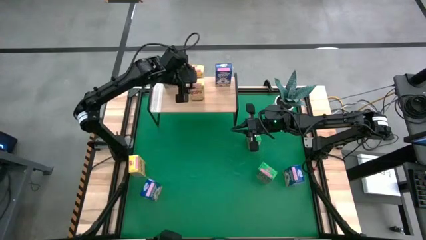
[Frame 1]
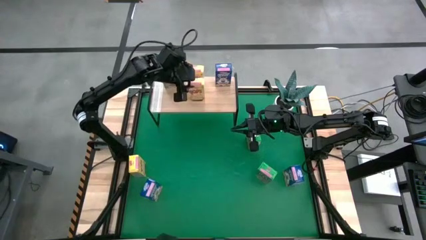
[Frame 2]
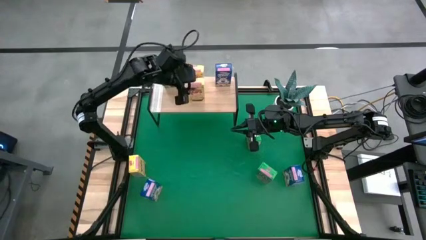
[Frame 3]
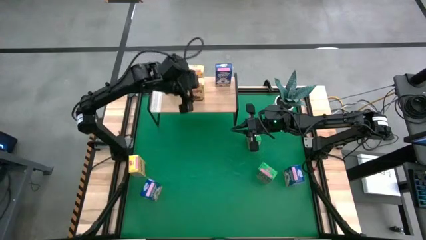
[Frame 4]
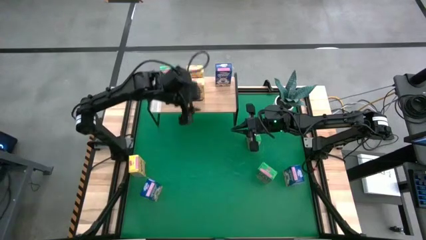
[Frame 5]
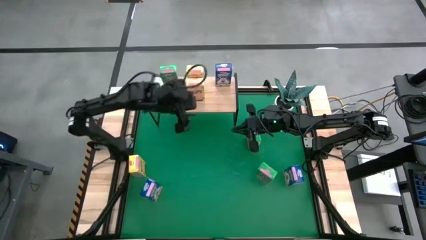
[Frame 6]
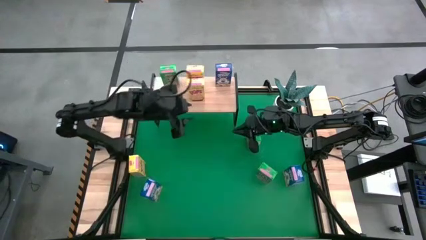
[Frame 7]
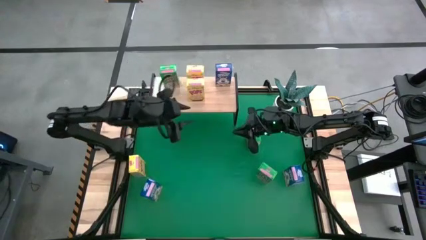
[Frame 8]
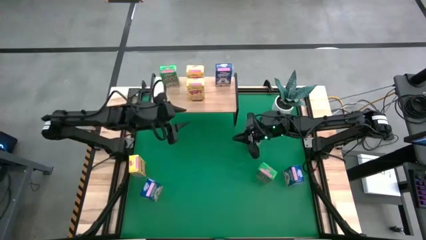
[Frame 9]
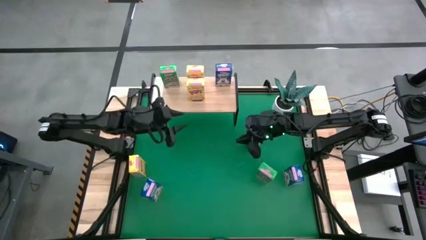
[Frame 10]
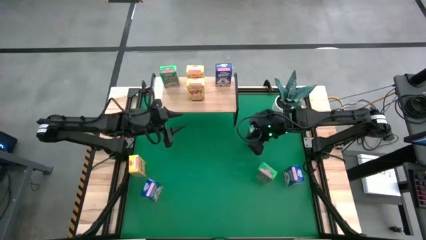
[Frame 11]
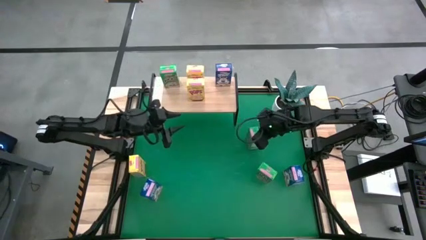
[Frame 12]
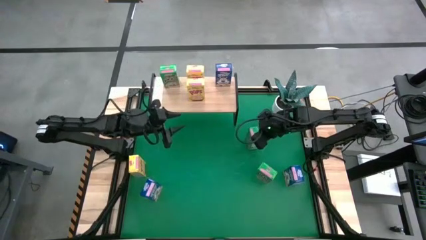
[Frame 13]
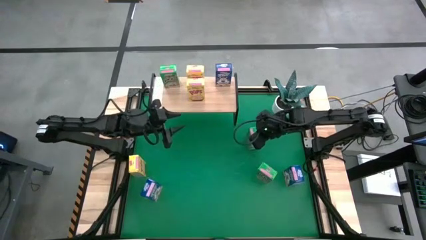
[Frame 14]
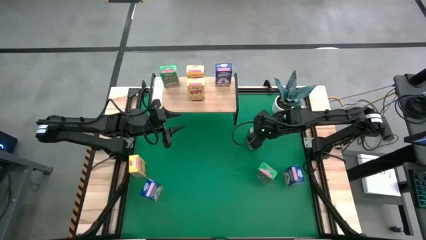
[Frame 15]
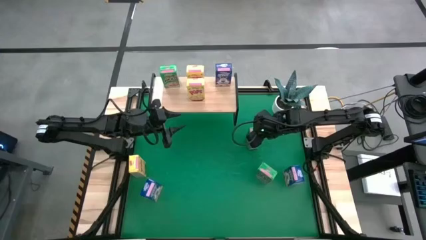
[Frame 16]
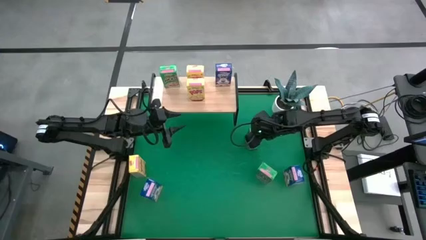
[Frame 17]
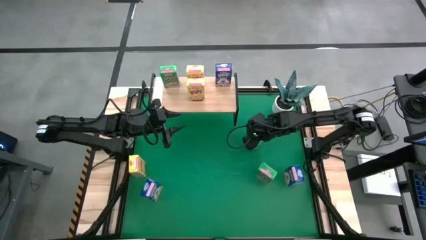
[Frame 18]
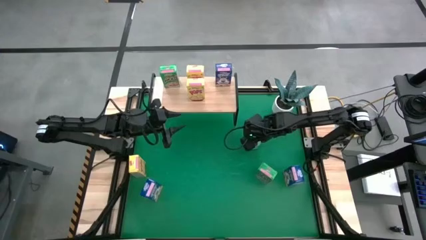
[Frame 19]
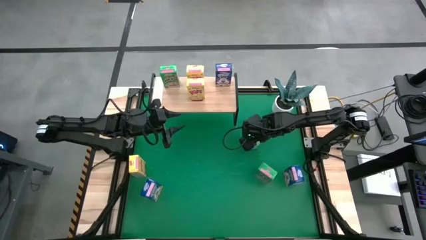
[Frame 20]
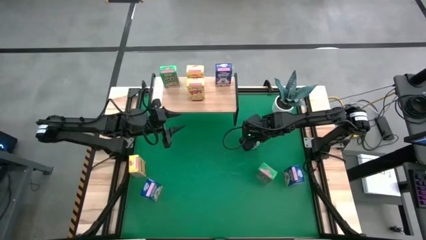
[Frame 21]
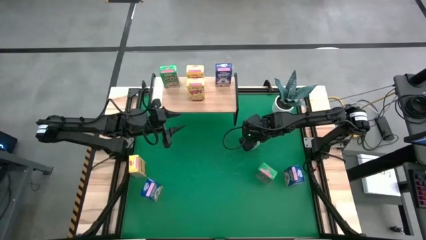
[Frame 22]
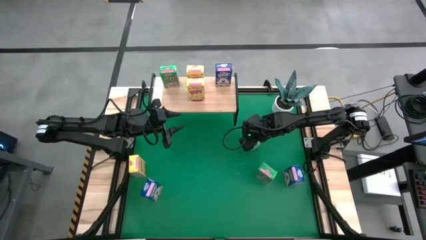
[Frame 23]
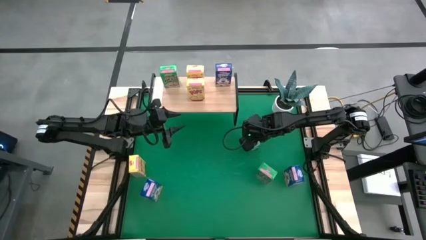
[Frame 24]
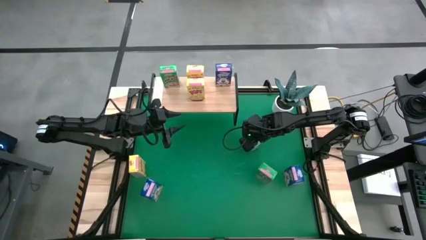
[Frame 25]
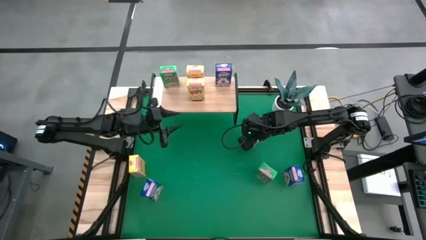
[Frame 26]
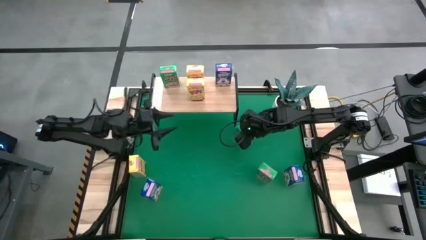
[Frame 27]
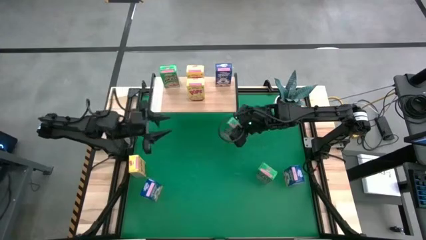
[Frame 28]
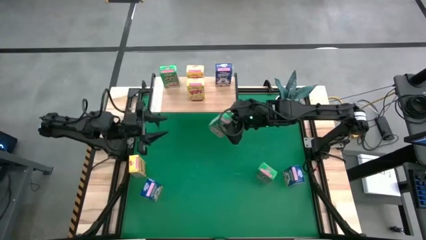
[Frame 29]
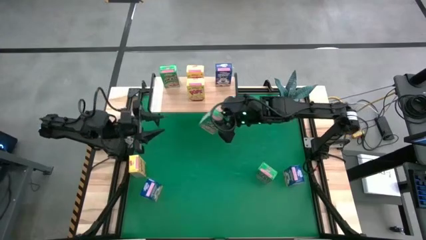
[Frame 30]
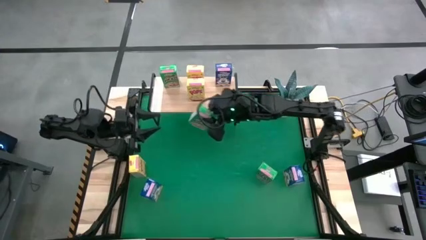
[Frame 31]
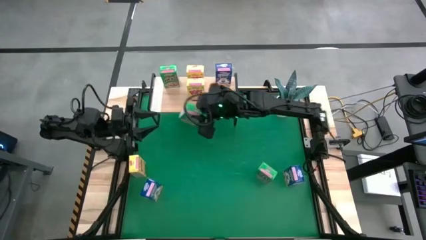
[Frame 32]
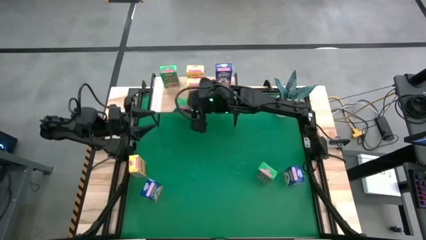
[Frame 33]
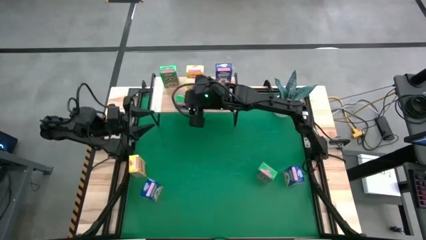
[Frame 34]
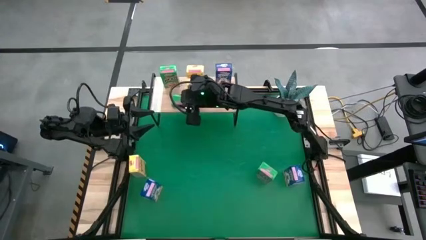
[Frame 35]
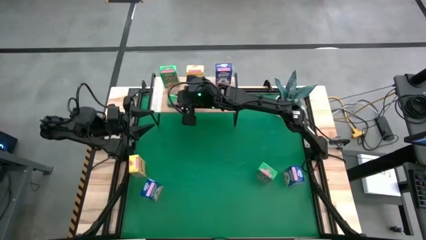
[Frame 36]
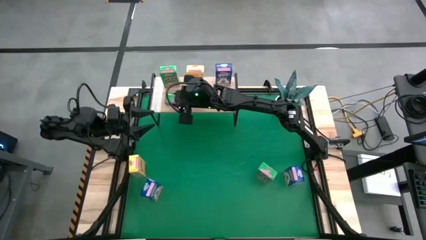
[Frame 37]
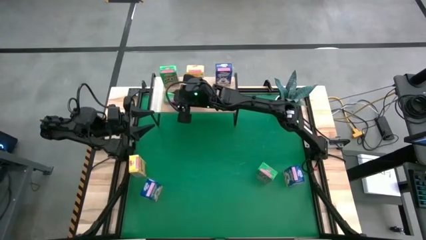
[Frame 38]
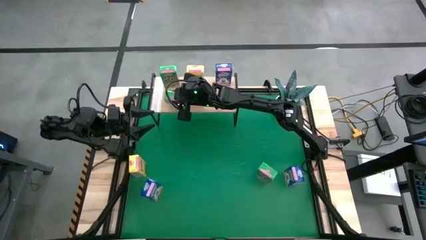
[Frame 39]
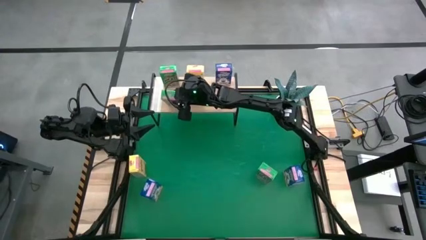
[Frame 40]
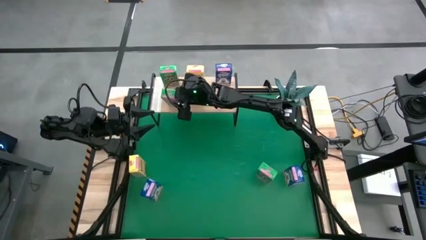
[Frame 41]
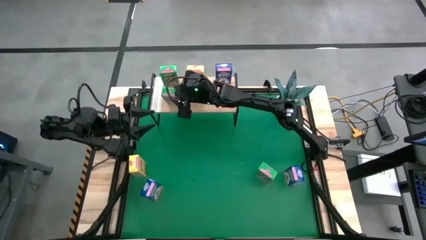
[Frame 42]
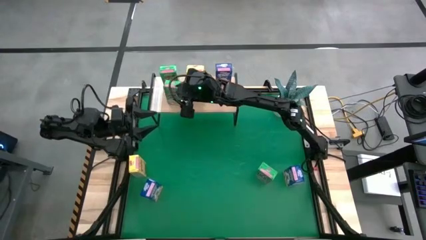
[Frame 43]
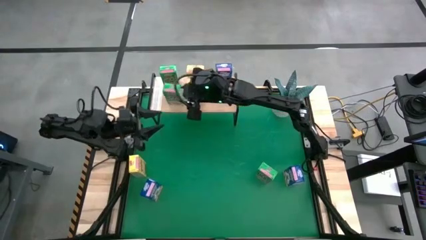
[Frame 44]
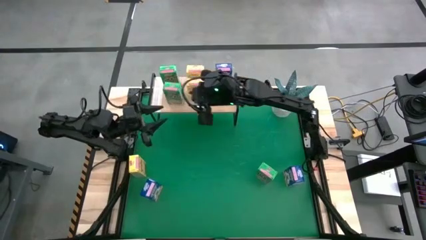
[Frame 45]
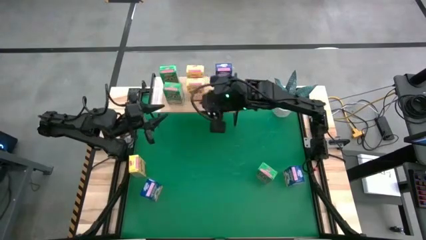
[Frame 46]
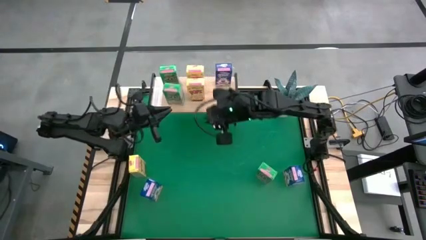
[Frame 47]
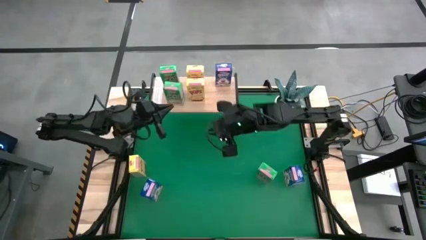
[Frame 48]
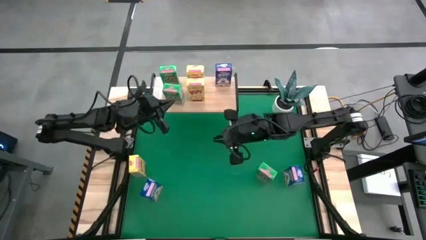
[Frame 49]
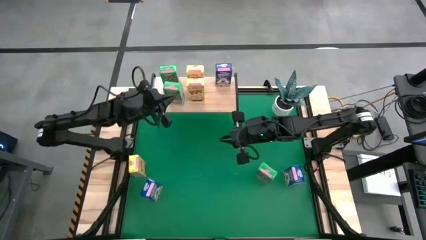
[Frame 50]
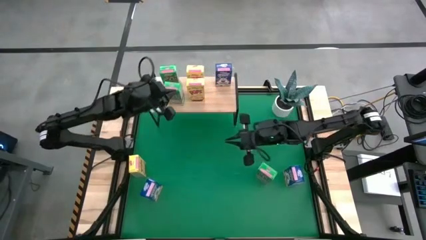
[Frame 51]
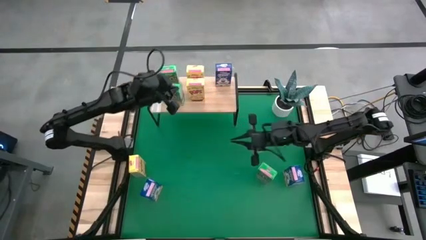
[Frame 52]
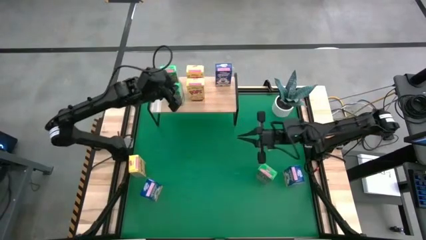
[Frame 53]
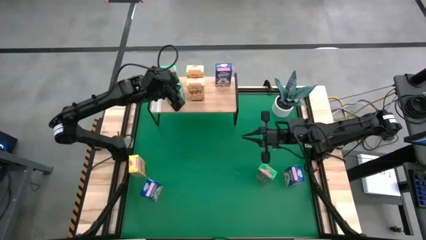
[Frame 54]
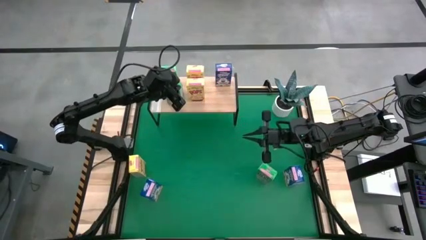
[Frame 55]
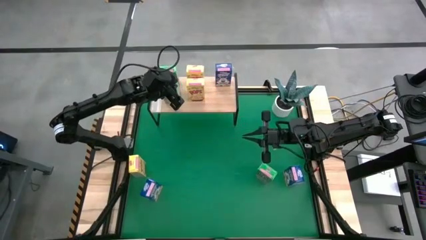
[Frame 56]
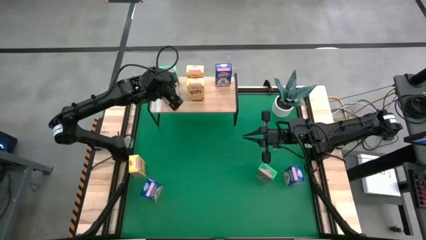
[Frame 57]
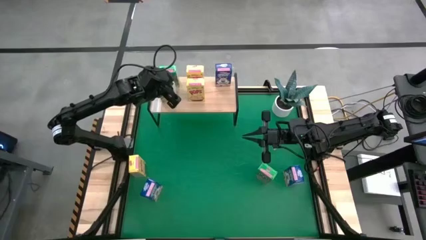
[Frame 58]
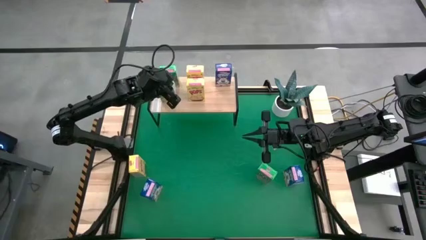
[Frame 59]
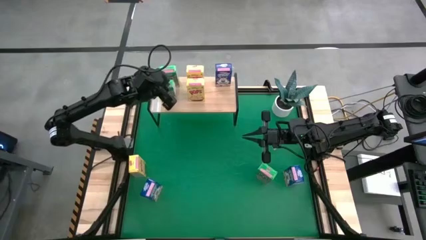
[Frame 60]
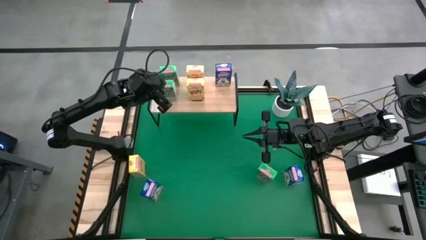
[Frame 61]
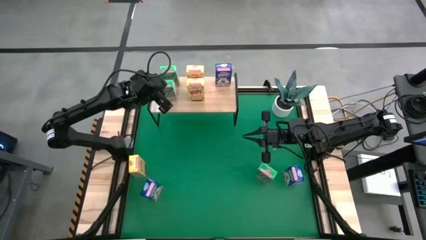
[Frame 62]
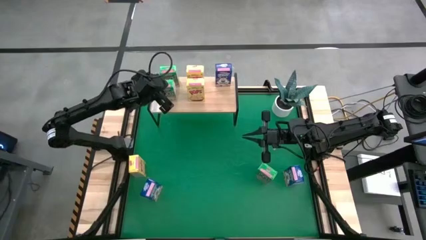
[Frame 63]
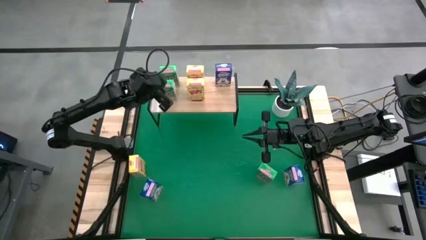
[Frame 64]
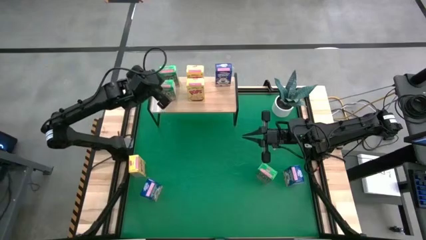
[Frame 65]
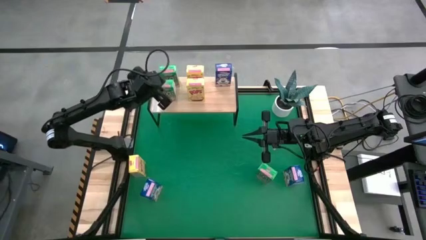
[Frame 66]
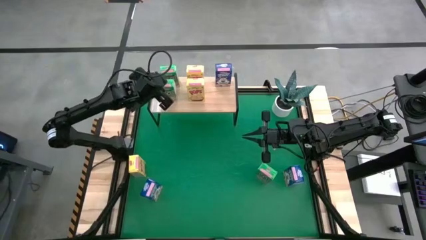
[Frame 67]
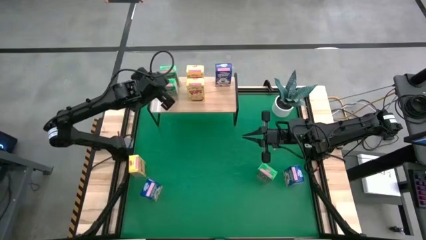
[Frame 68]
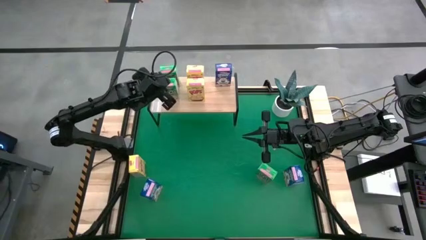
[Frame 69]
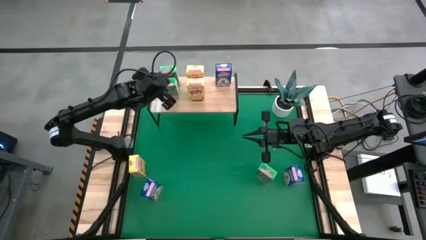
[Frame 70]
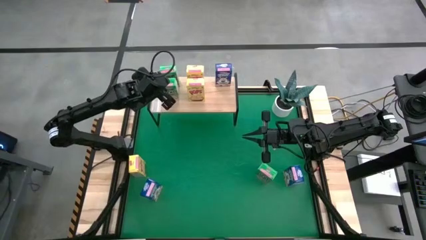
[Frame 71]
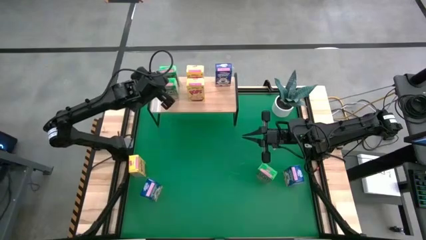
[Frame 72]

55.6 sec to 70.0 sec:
Task: Stack cereal on shelf
Put the top green cereal box on the shelf aligned with the other green cereal box

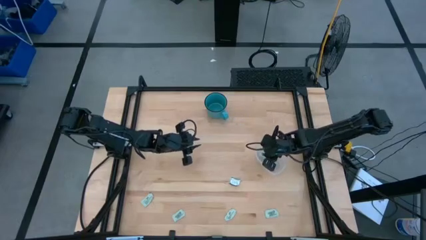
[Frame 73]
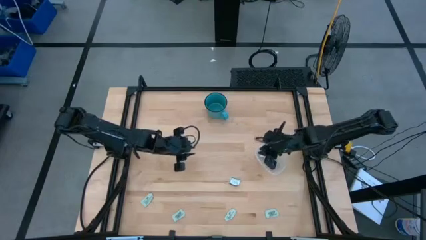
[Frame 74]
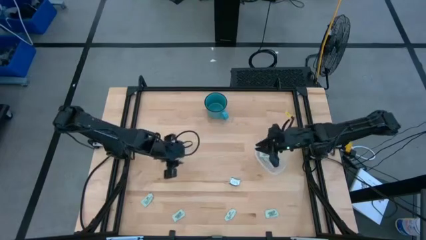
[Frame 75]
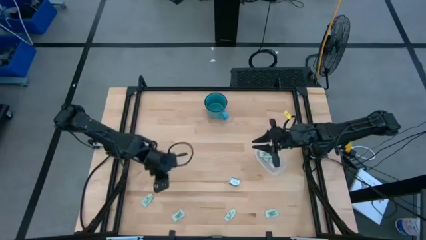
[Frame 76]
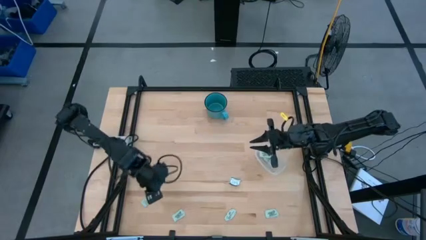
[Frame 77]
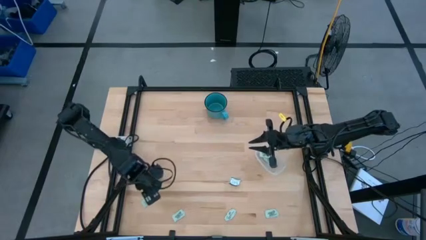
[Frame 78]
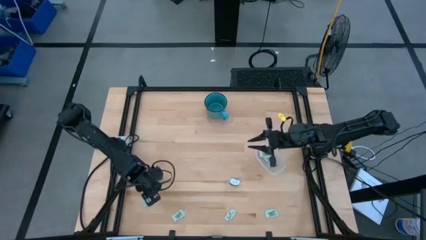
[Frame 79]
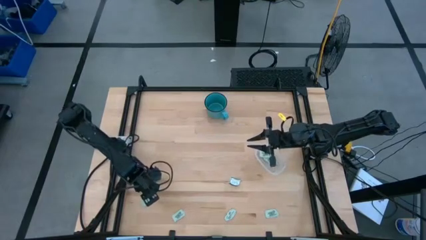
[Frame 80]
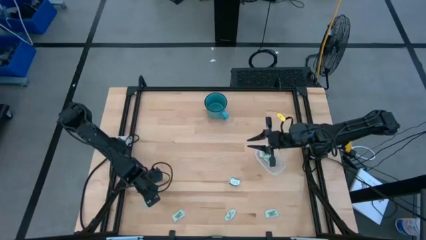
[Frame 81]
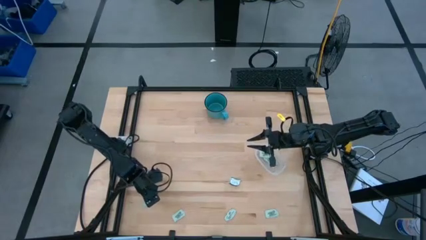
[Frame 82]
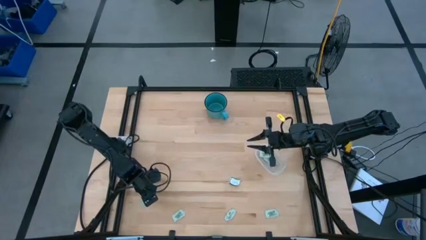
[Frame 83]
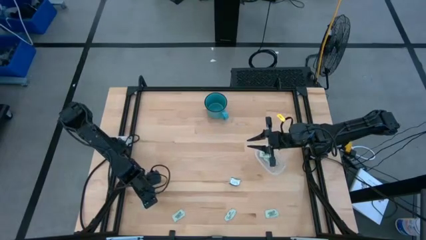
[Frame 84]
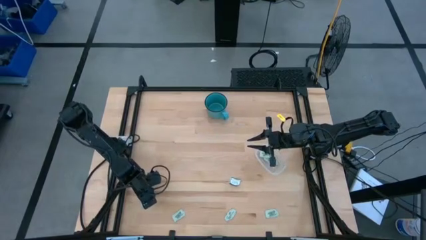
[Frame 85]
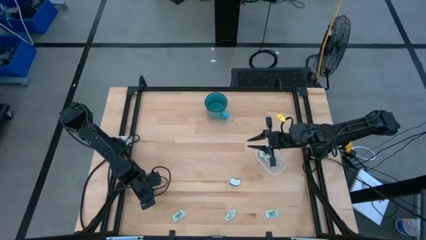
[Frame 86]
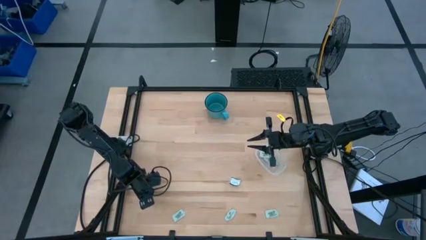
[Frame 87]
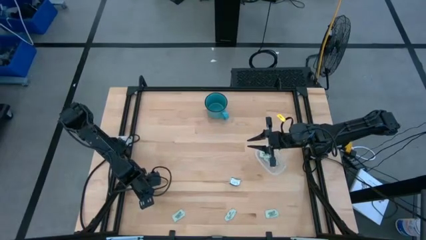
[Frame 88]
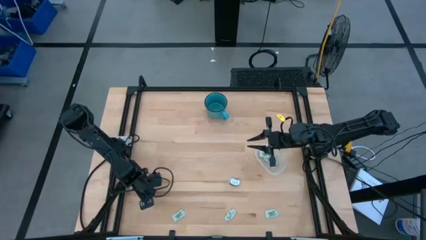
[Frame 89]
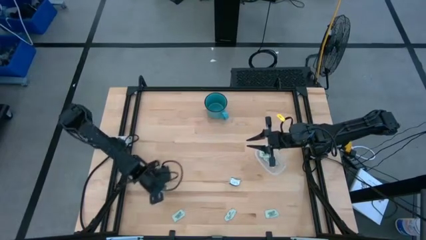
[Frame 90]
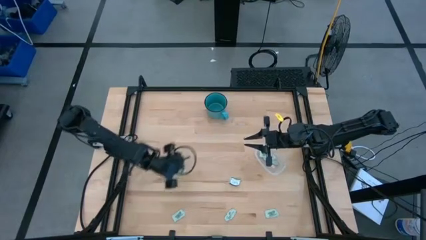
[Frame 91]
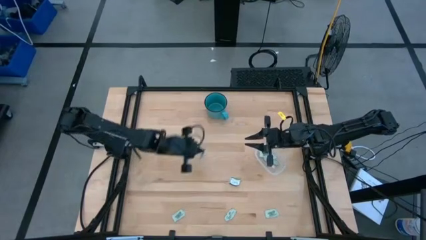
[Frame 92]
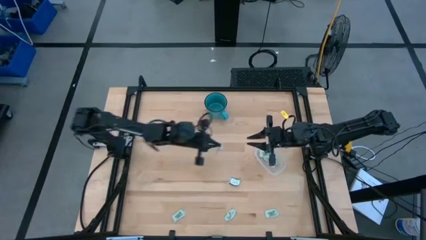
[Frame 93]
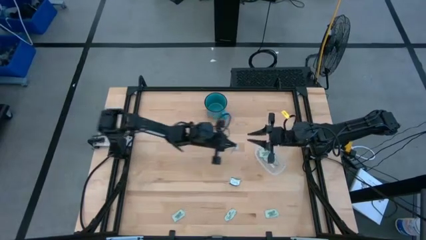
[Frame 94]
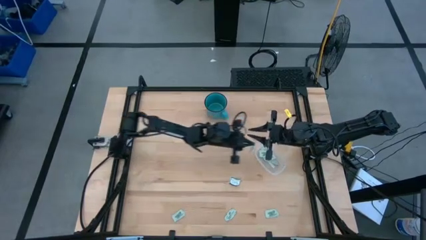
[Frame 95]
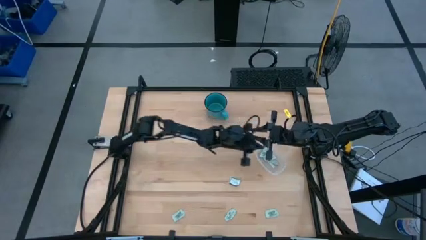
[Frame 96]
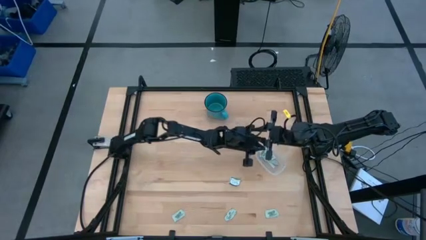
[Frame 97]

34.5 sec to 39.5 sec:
Task: Pick and place Stevia / Truvia into bins
Put the white stevia packet into the transparent container
